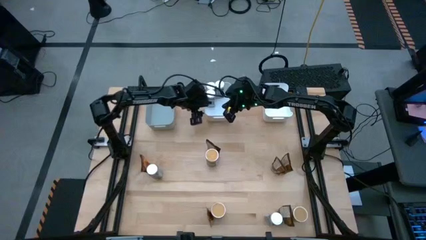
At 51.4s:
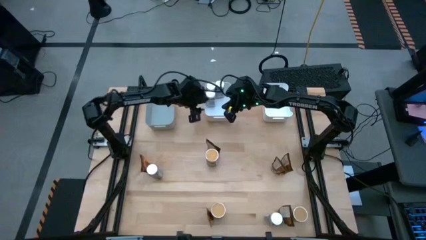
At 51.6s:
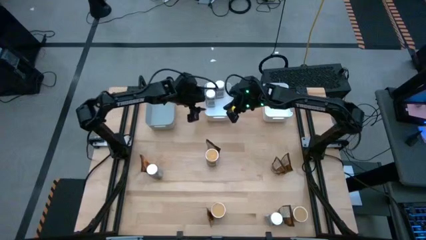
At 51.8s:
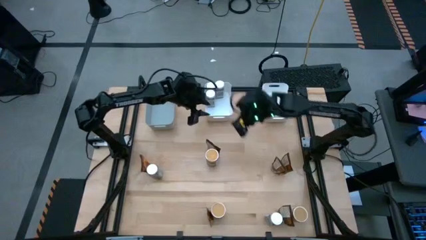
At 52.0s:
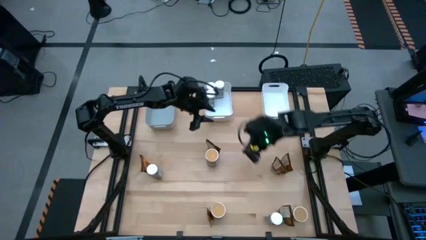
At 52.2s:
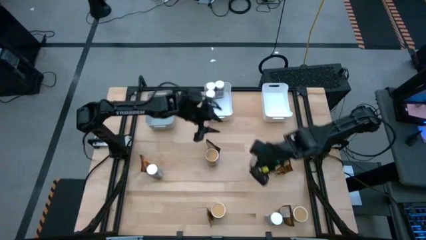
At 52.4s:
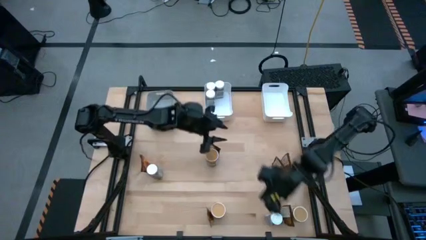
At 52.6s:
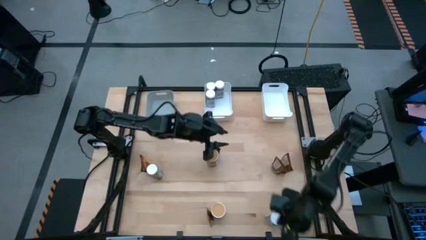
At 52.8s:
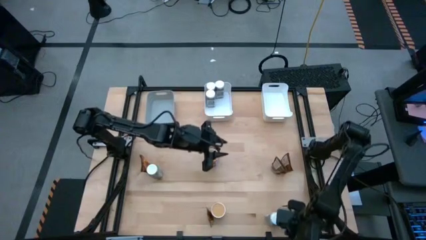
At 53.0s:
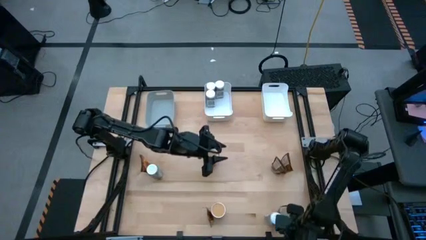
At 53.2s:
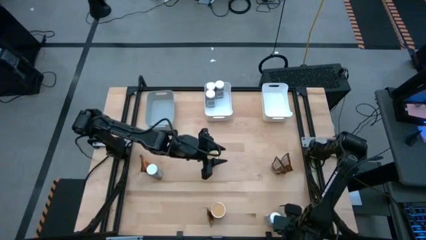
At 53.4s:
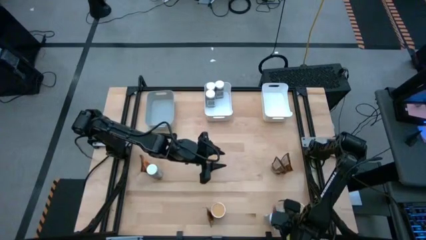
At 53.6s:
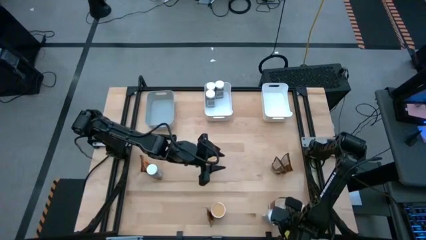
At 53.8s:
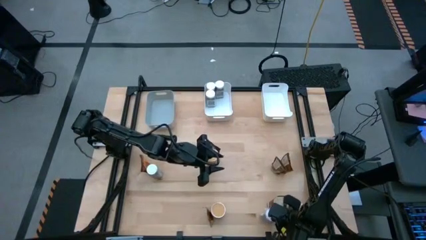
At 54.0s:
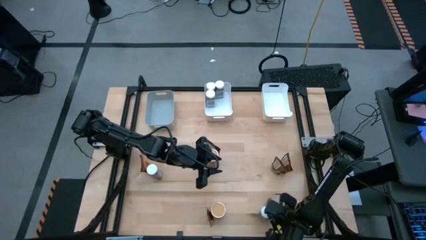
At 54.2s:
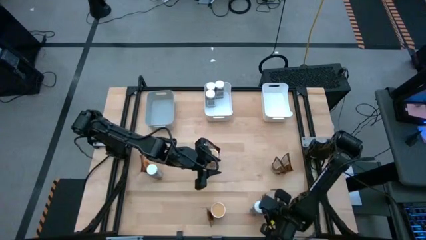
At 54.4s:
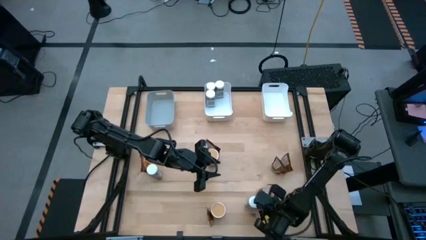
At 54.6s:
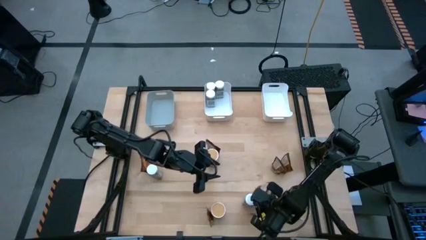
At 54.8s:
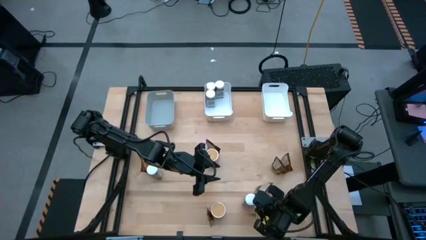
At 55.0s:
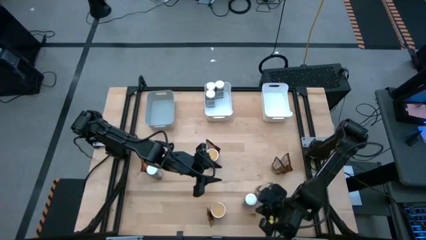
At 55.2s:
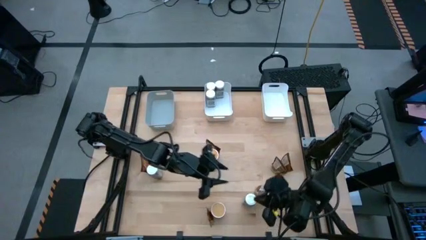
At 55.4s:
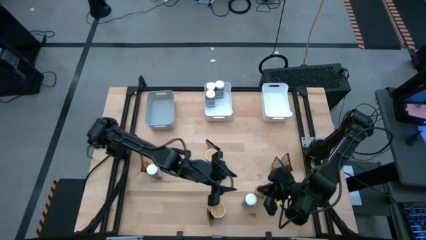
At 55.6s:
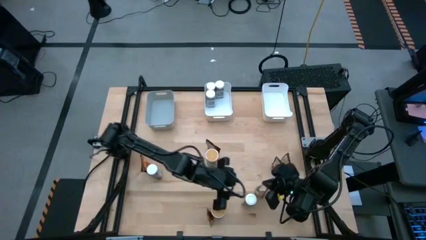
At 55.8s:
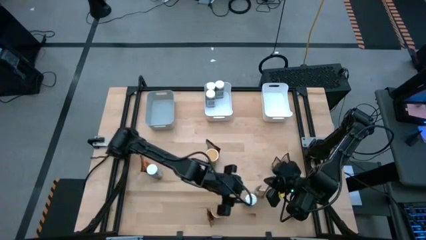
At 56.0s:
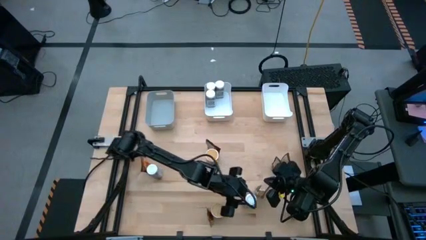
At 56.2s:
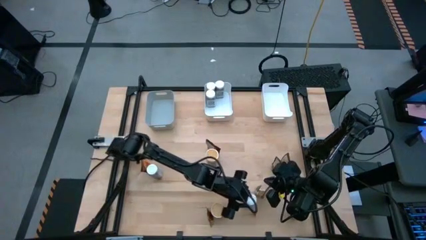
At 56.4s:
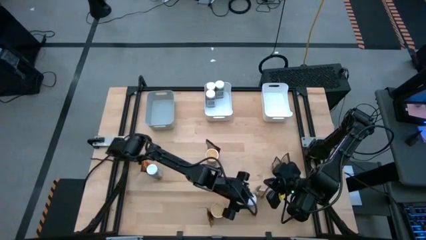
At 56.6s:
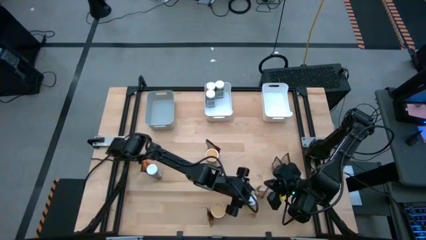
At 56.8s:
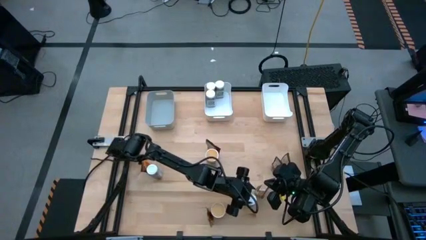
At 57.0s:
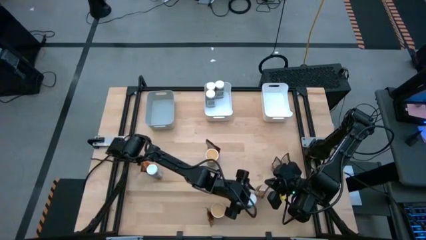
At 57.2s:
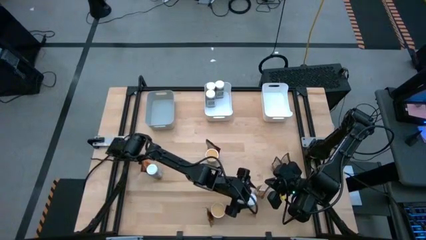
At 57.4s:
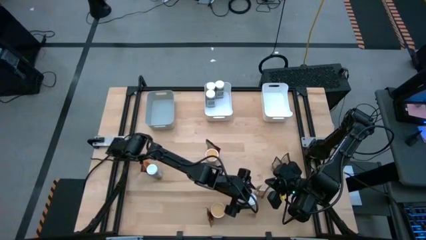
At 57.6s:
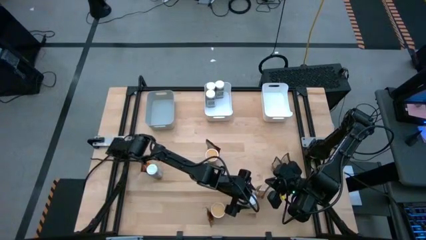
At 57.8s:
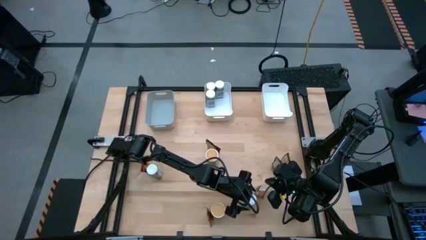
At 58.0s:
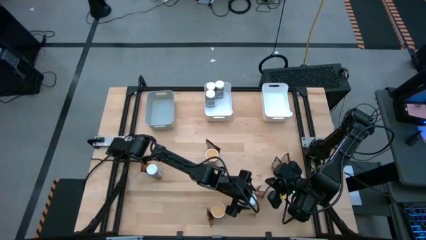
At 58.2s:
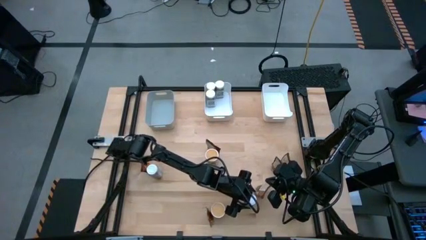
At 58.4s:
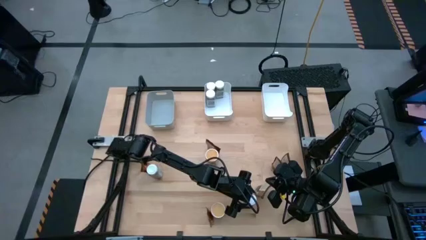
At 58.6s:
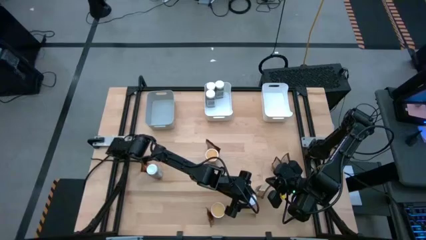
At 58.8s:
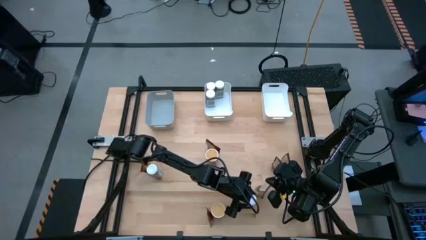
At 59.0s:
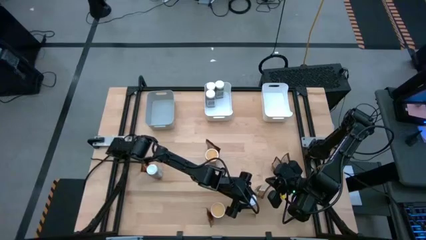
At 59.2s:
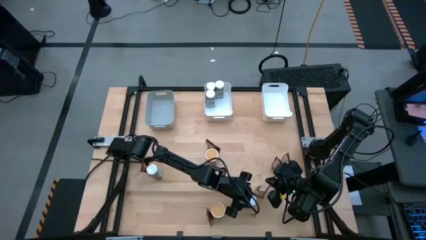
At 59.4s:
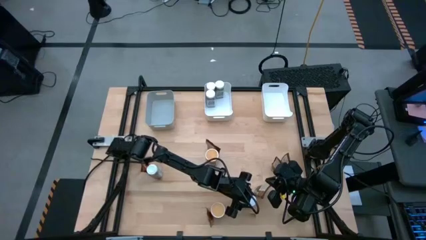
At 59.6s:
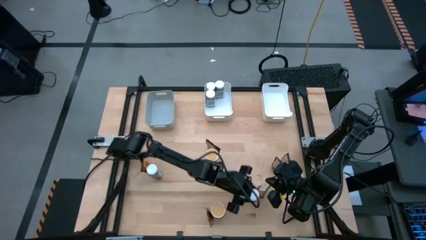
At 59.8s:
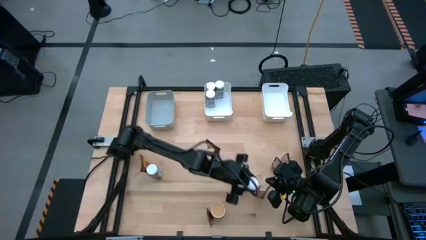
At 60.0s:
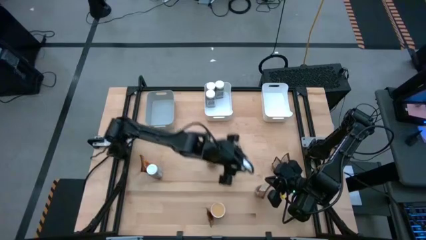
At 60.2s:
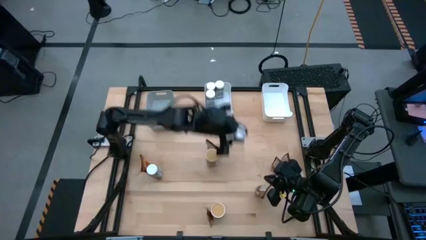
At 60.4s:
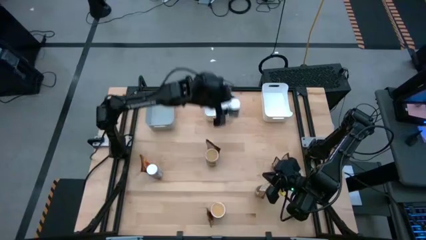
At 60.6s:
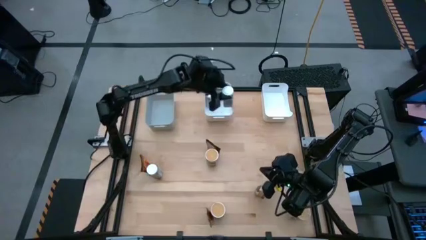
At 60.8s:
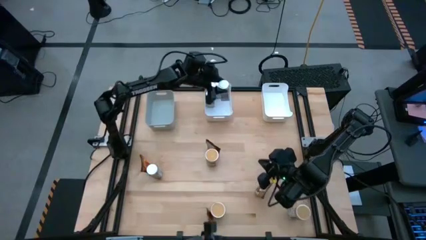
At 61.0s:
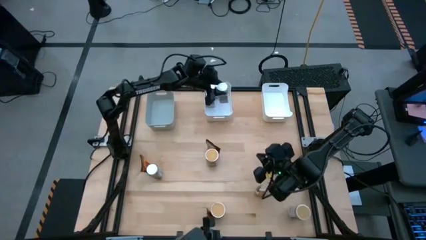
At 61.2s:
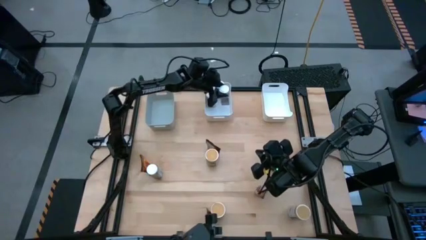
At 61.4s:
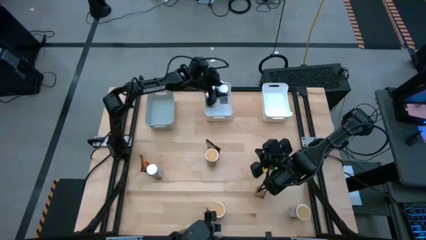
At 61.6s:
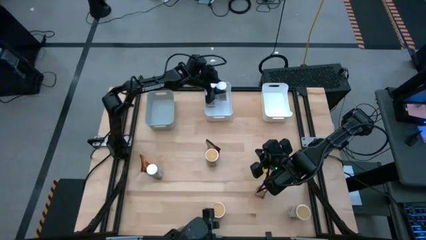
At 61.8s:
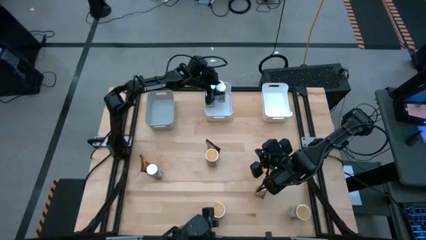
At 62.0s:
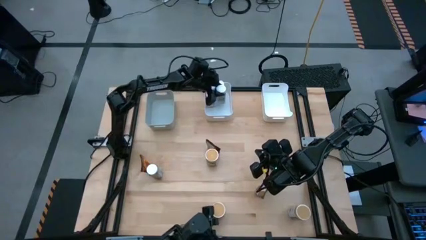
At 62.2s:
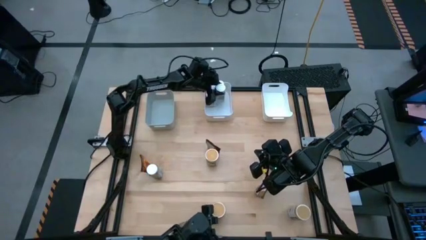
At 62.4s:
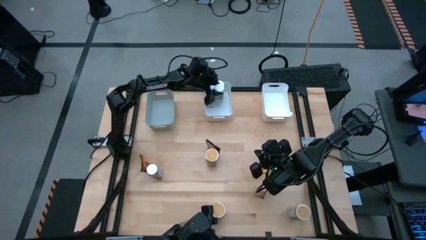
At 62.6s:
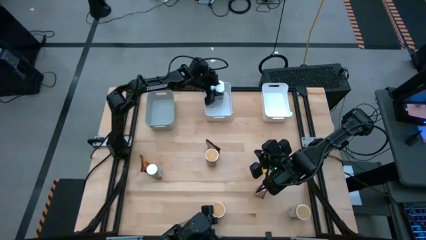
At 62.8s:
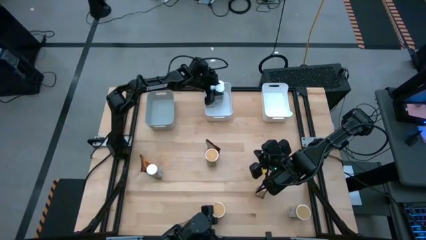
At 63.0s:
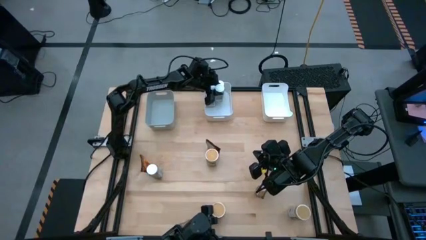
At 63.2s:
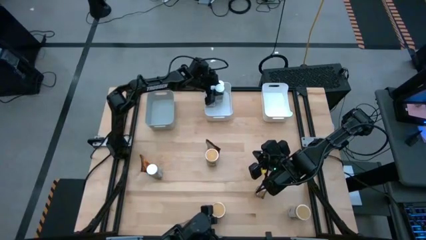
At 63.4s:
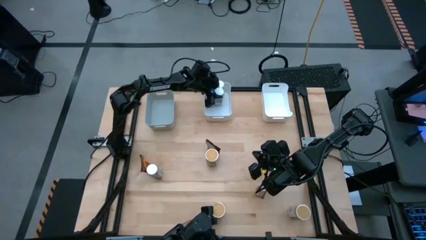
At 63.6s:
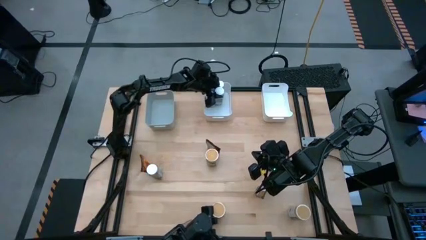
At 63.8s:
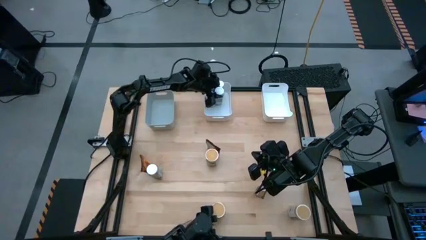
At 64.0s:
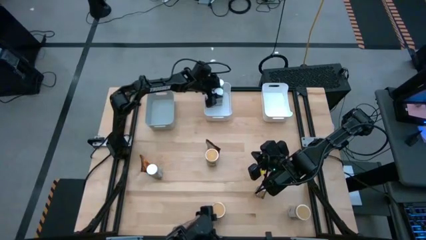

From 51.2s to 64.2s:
Task: Sort spices by type
Put the white seasoning bottle into the left white bin

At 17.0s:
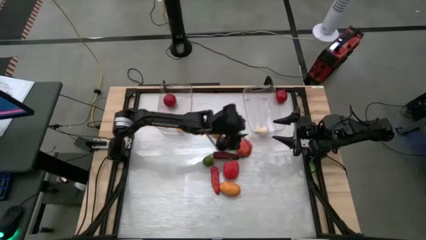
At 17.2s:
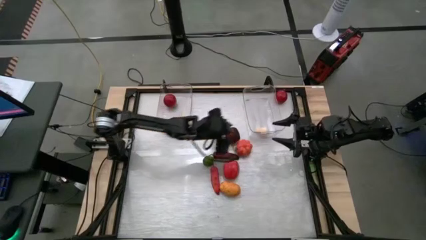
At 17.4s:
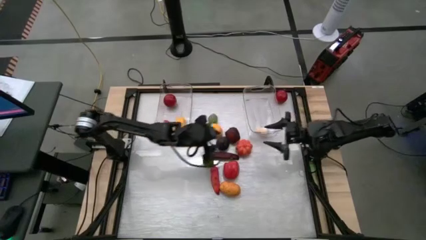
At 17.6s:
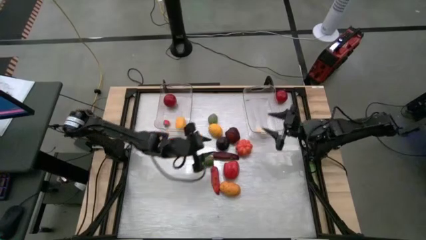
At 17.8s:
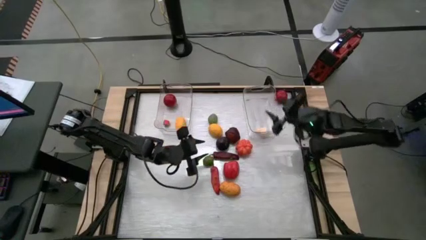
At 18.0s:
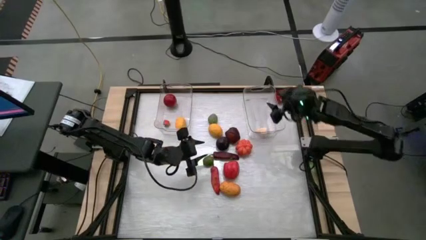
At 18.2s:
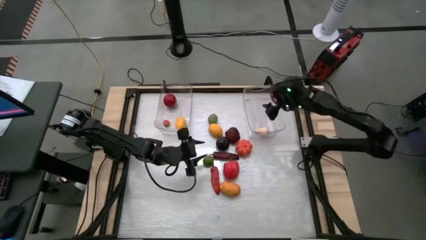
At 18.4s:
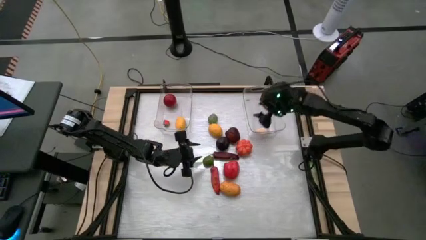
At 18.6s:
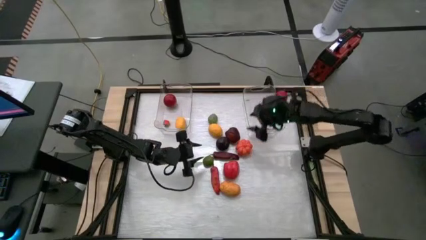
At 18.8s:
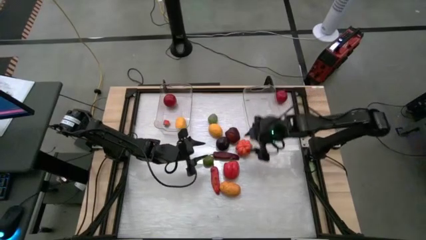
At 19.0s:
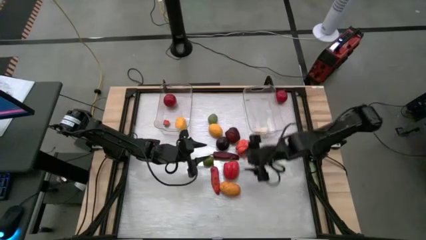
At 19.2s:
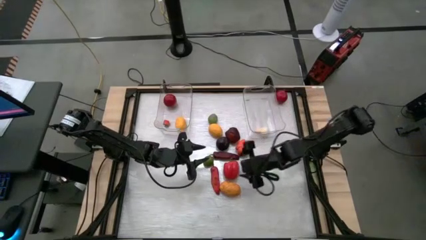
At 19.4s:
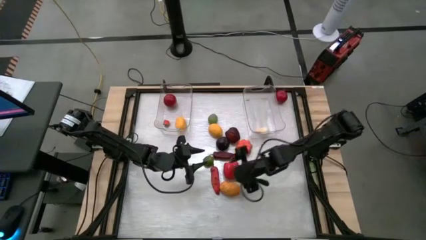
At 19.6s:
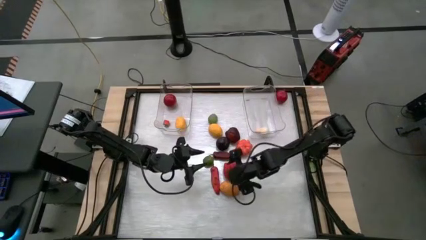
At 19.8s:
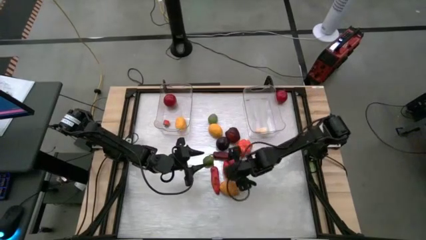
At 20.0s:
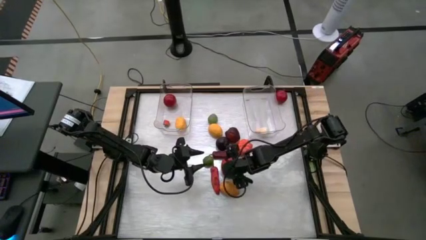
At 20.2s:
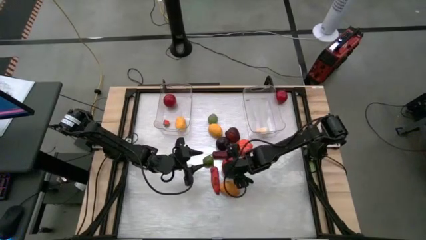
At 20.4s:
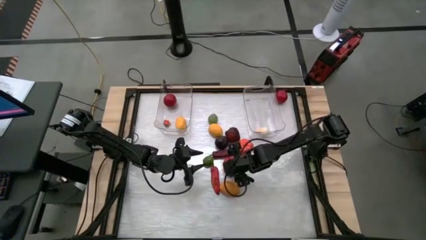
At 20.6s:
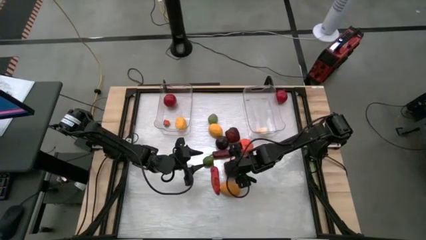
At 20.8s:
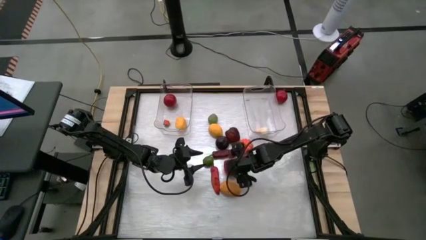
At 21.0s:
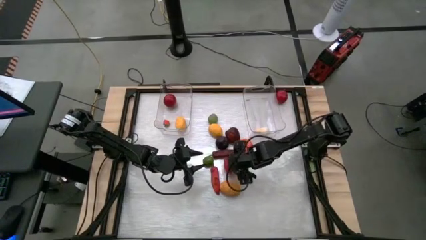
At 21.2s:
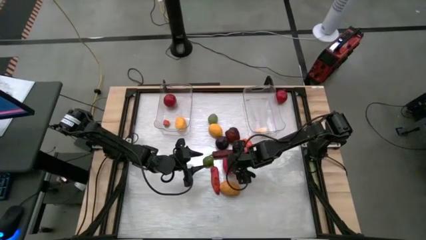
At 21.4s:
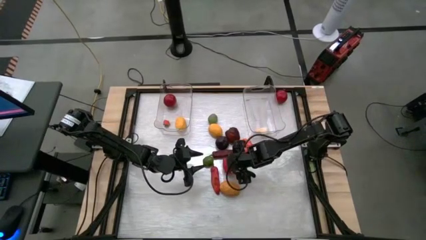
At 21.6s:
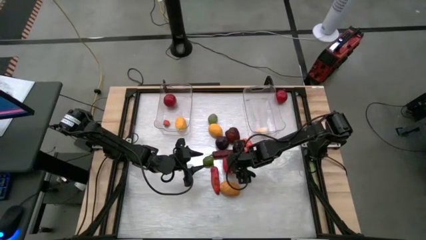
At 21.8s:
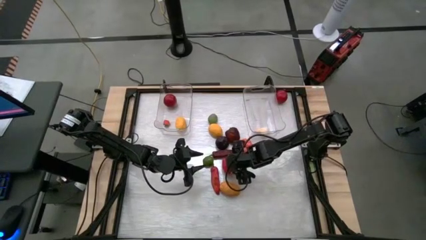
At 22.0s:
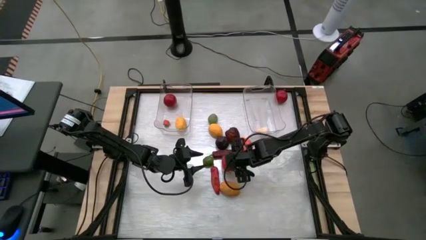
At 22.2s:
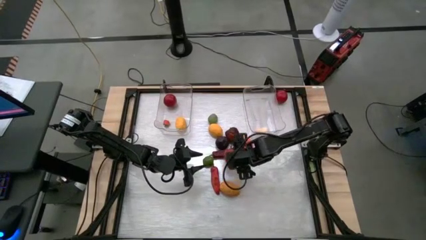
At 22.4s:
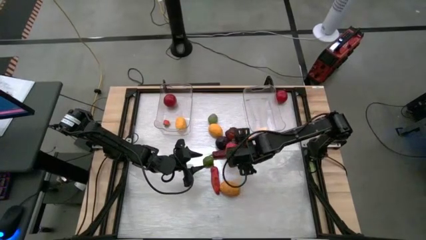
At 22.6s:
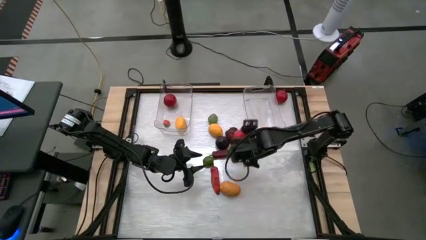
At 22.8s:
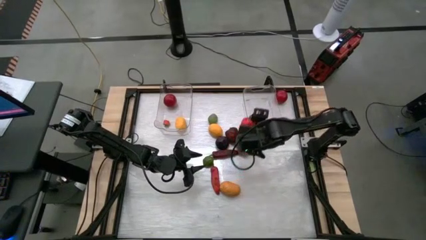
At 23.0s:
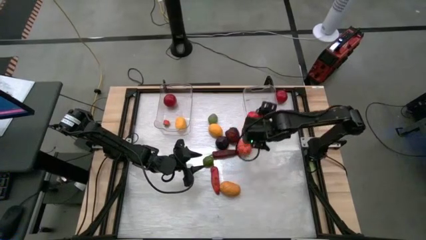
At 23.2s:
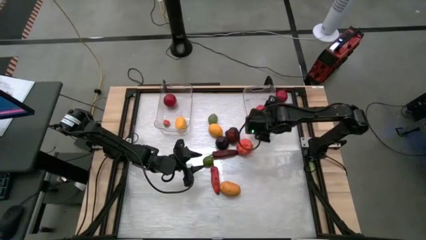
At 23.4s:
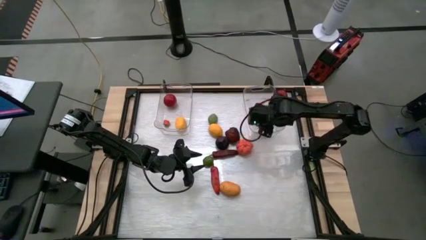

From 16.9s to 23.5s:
Task: Sort produce into baskets
Put the red bell pepper into the right transparent bin
